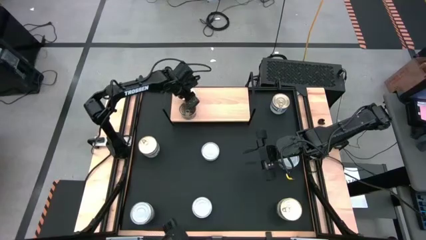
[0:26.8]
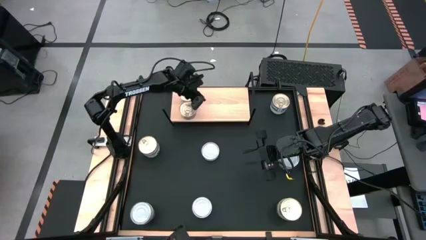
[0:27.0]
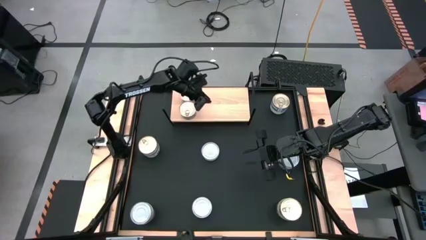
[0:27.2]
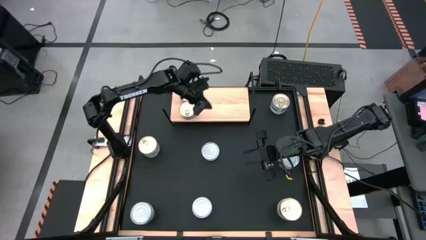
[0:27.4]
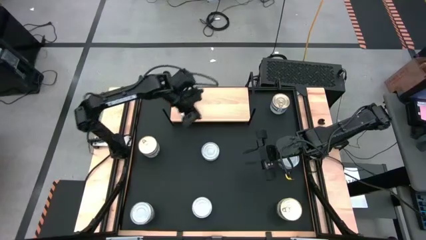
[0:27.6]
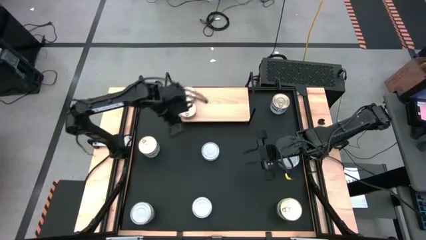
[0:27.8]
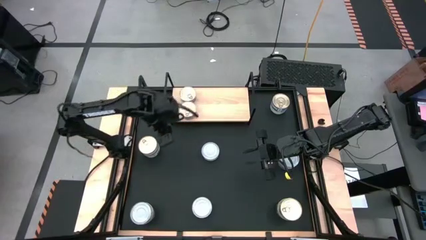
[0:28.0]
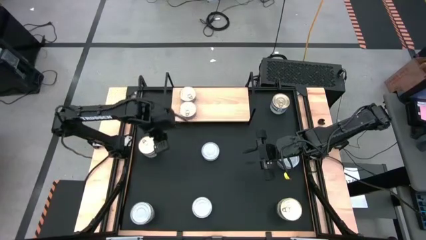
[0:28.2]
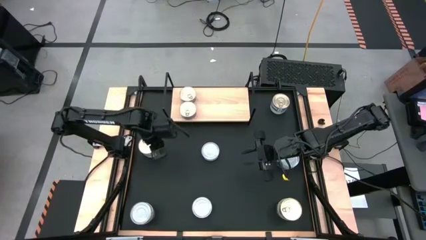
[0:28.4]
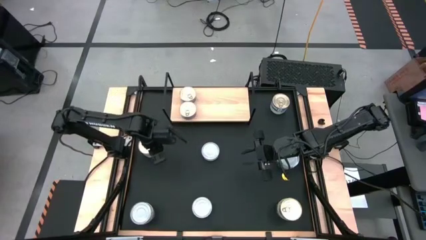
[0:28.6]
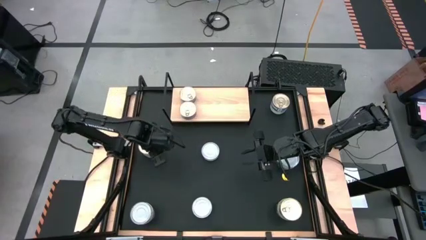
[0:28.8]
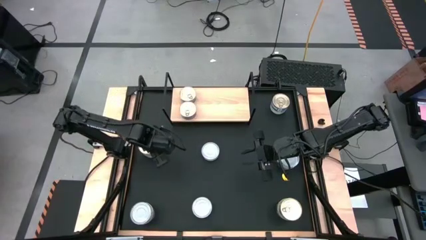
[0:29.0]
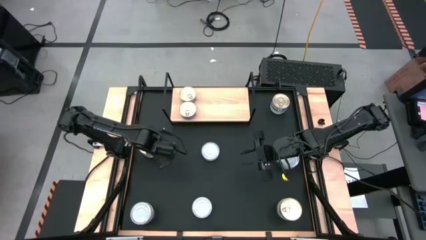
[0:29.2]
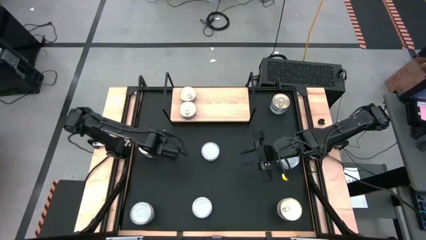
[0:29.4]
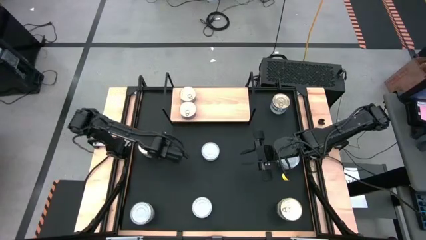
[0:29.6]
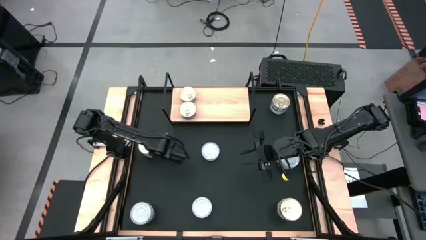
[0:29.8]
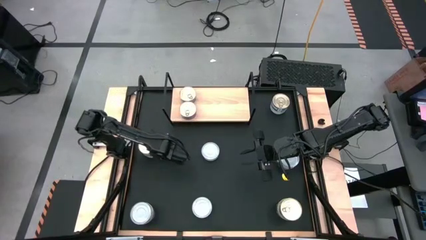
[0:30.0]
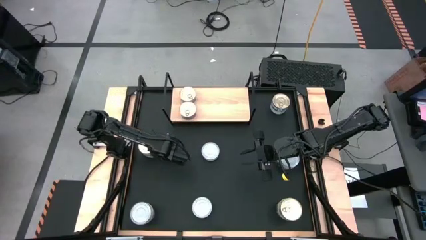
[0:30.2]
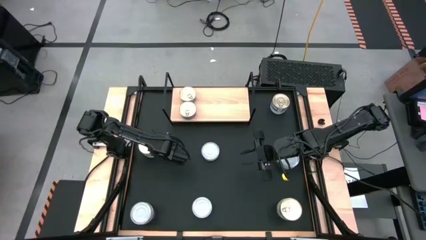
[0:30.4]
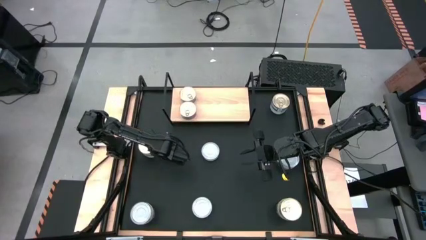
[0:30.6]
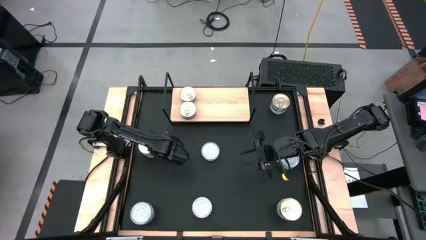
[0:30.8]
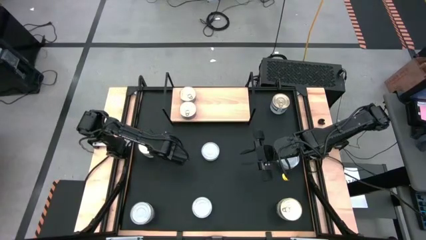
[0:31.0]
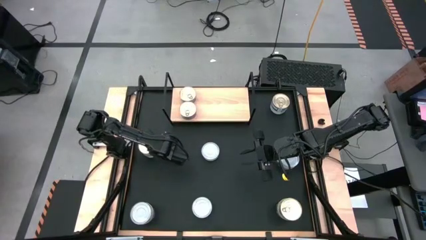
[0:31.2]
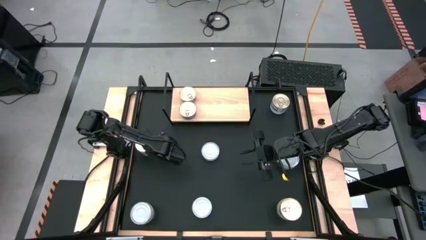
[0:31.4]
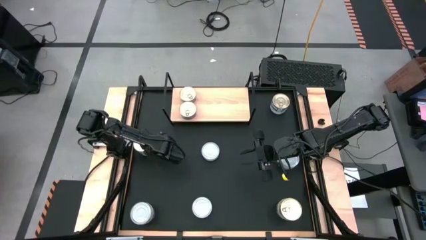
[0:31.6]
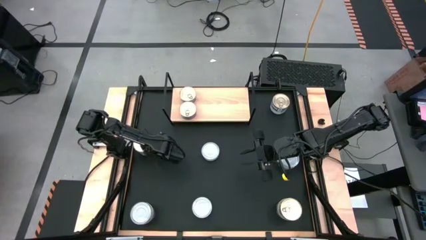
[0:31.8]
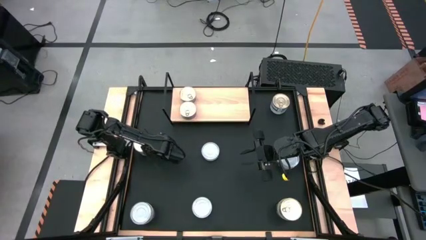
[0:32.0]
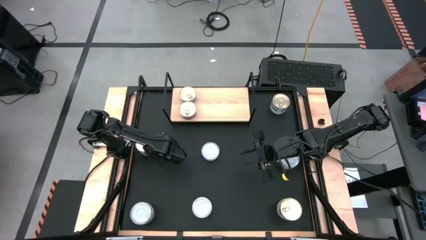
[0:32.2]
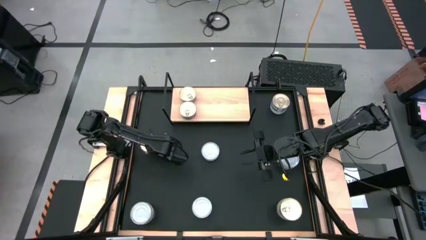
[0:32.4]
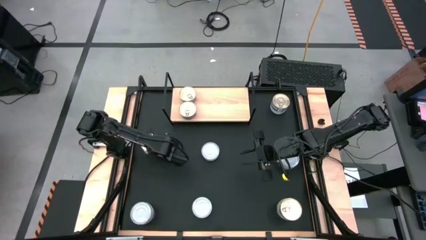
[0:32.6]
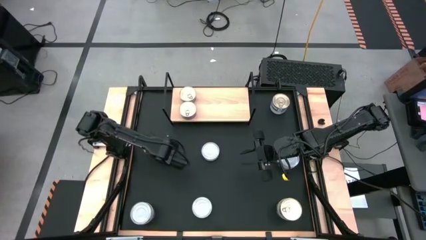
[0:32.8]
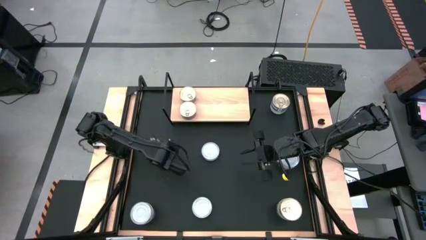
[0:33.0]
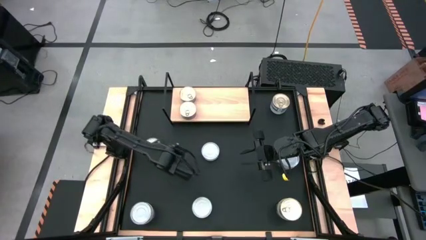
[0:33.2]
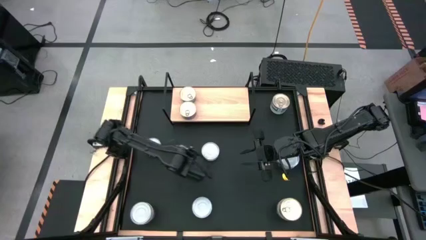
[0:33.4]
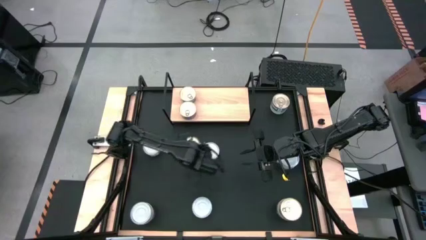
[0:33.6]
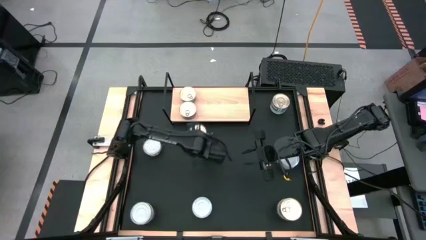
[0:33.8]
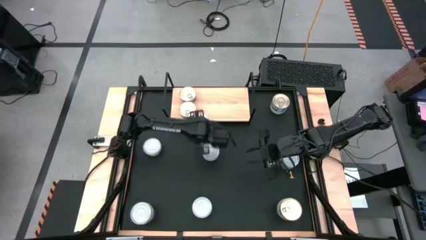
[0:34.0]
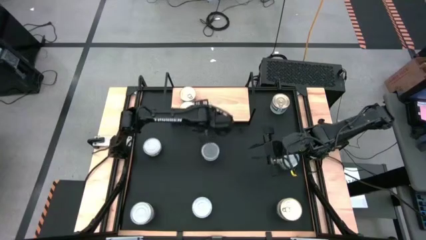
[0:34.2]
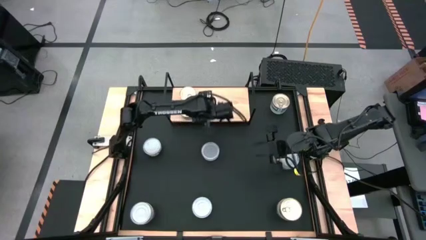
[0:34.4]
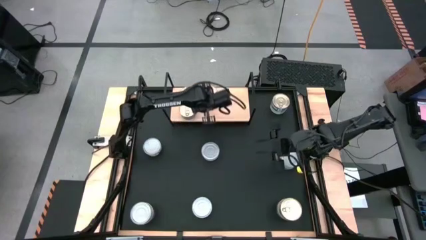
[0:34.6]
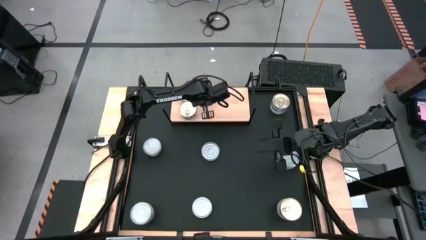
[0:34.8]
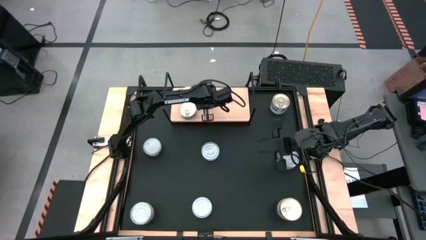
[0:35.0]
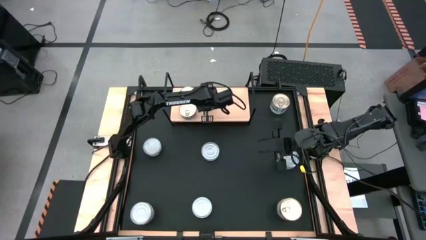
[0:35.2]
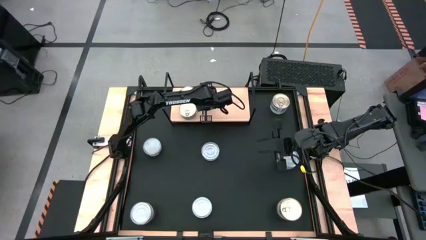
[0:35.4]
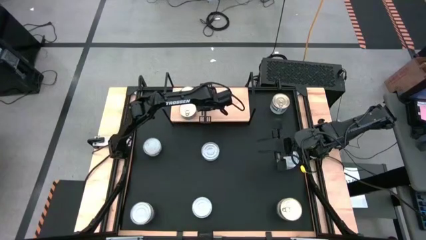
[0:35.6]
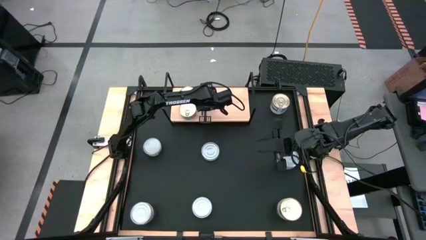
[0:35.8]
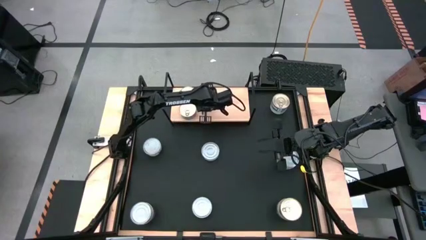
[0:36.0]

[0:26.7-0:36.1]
Task: Stack canned seafood by type on shelf
Put the blue tuna can on the shelf

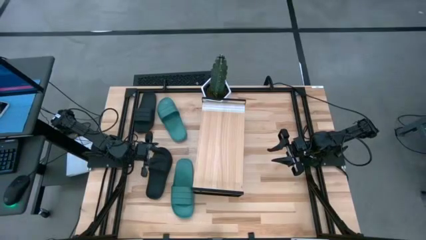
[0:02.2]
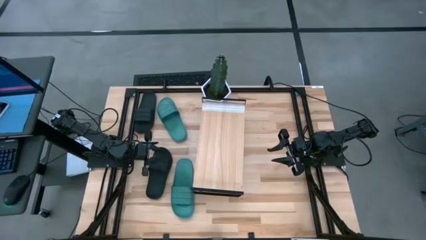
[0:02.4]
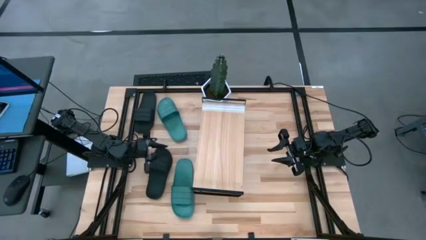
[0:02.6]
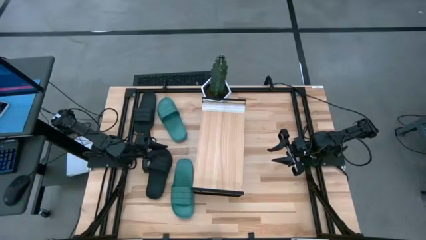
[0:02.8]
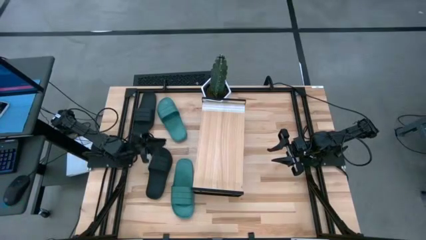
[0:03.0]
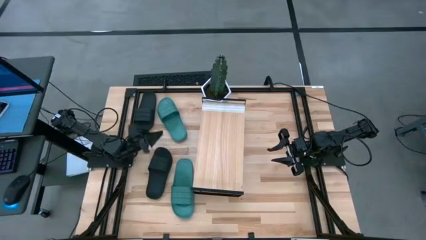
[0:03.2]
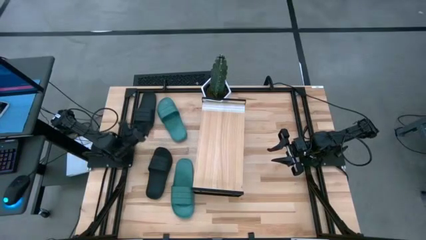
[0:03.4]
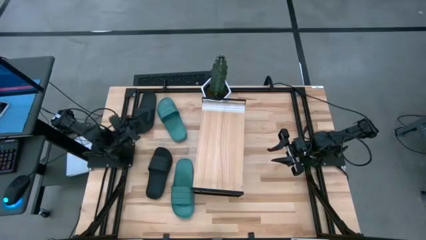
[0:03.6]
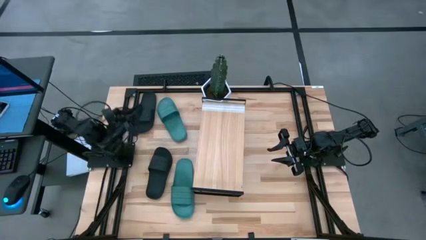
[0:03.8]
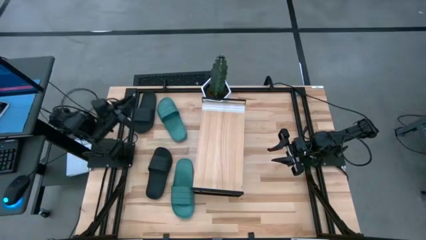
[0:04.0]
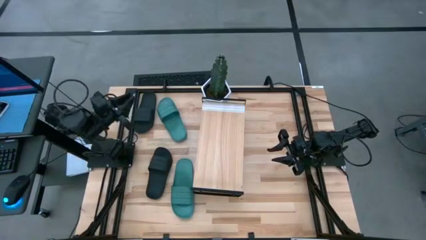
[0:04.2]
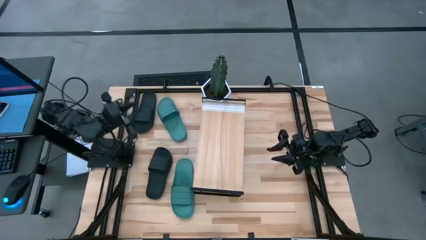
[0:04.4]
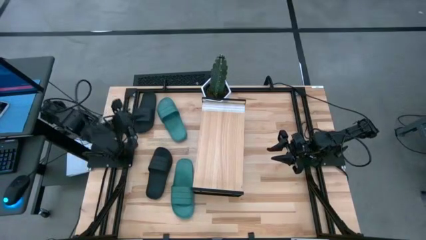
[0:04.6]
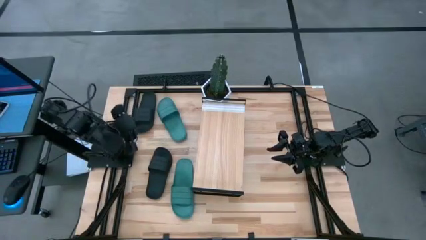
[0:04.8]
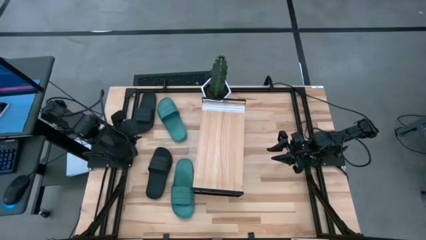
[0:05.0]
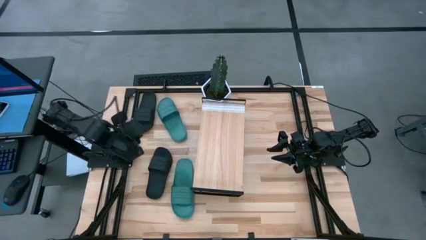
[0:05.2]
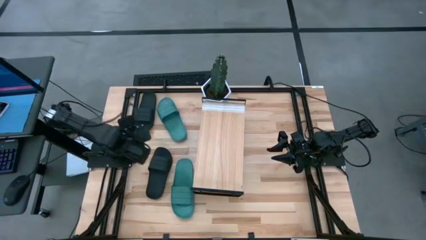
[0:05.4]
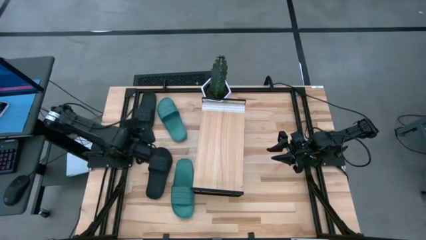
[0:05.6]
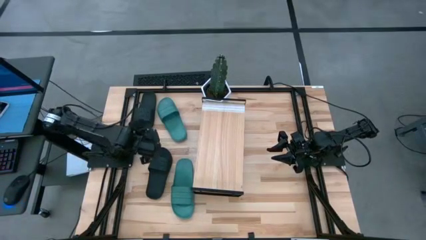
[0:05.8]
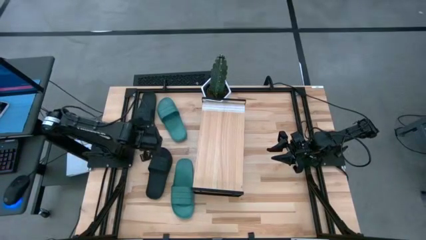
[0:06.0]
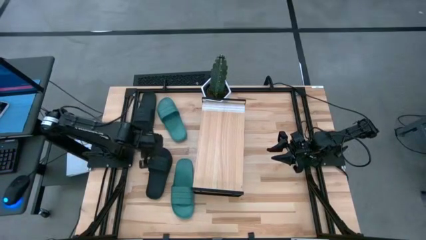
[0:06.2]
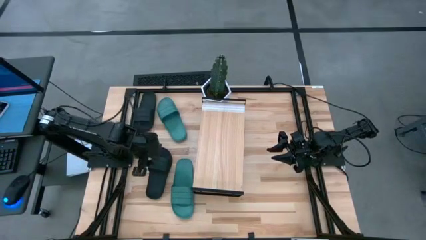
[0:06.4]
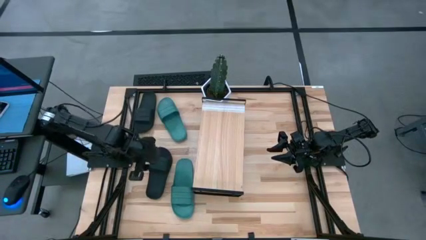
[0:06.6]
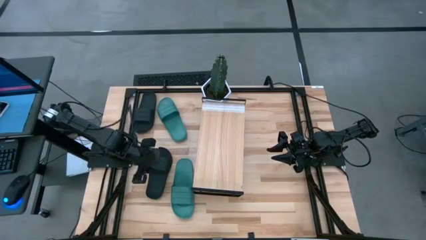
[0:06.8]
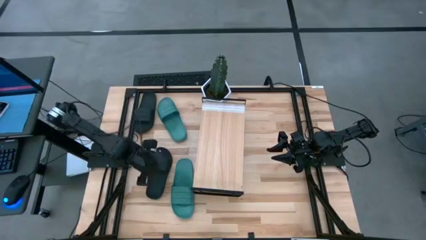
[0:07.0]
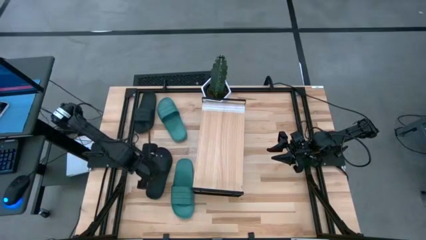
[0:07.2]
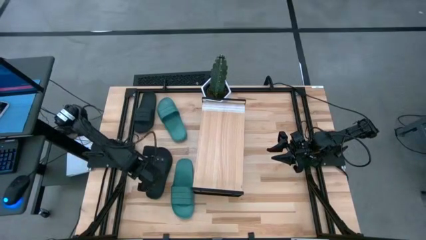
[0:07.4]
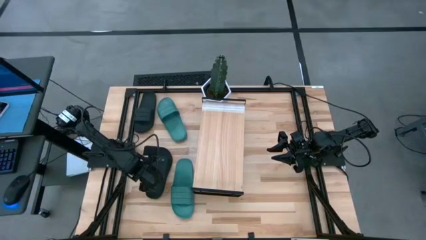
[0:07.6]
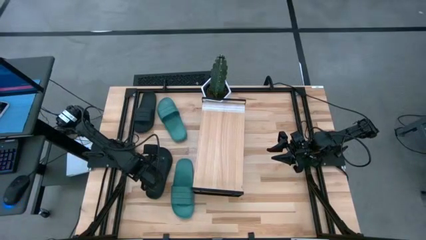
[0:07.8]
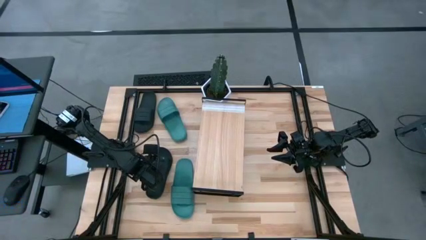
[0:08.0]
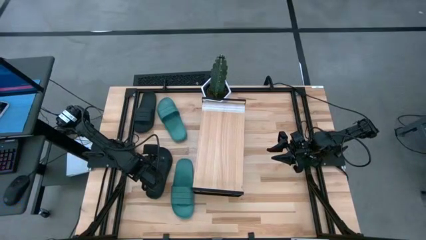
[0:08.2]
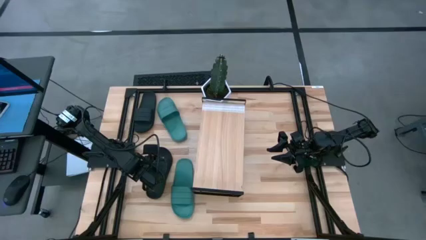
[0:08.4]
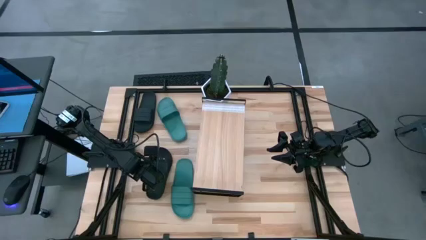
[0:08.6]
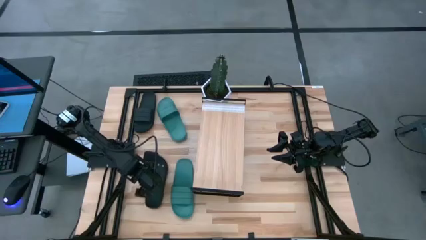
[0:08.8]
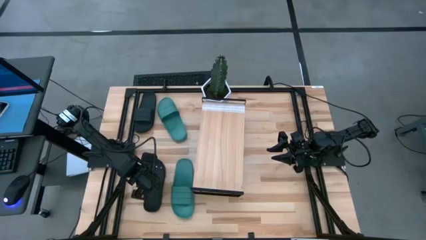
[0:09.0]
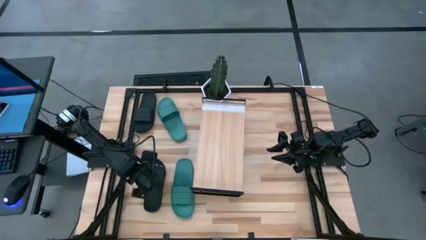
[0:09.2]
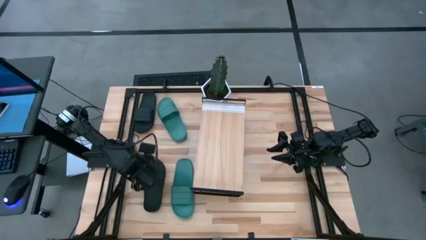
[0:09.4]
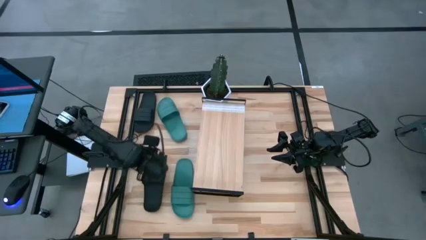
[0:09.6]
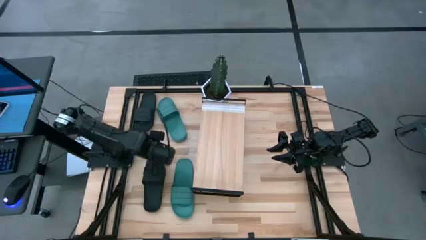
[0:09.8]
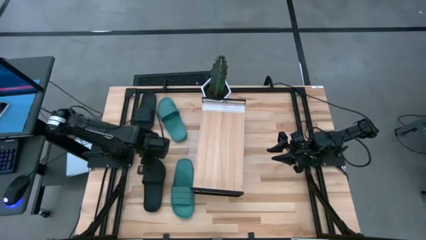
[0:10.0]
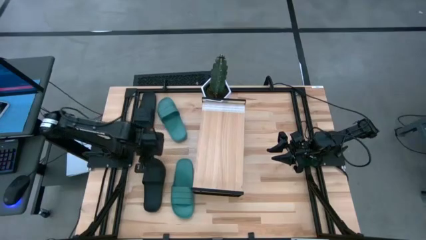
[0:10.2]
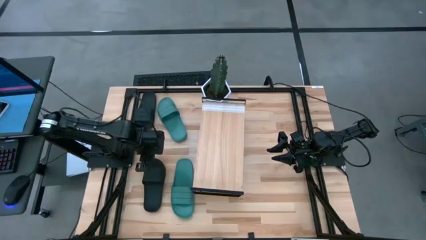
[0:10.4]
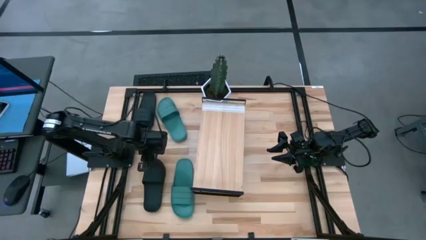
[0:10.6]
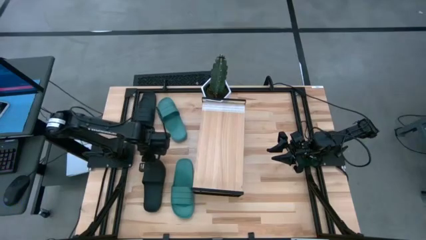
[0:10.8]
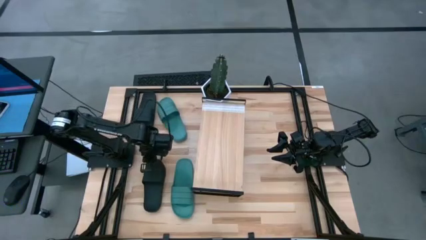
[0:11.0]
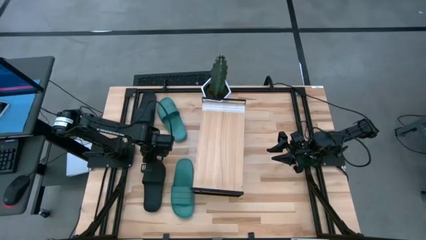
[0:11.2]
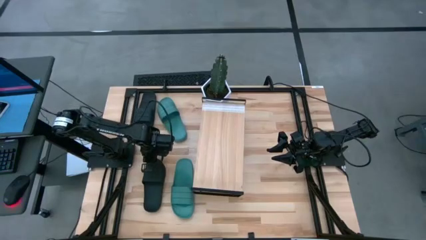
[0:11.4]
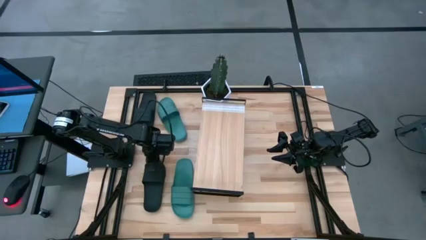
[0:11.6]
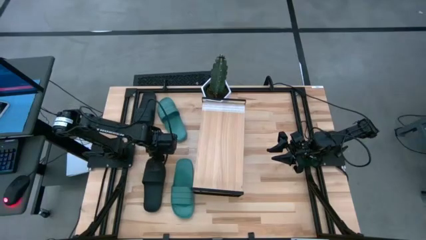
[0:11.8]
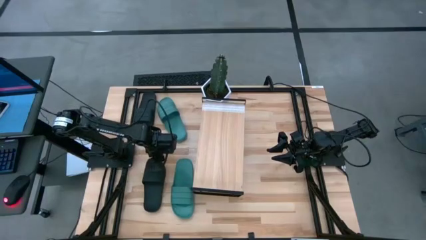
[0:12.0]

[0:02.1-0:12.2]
Task: Pick and place slides into the shelf
Put the bottom black slipper on the shelf
